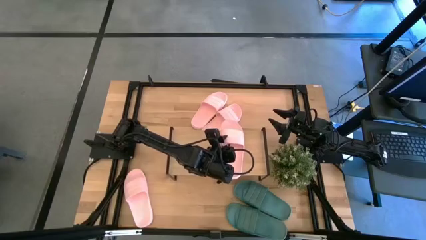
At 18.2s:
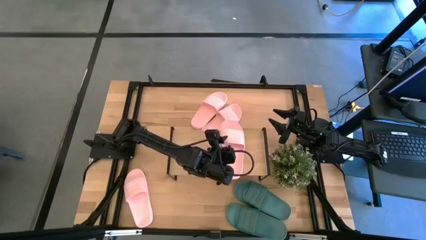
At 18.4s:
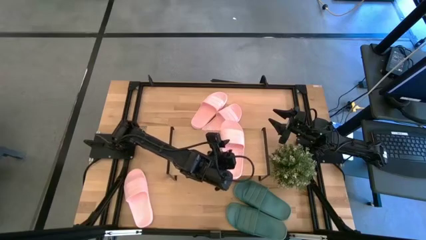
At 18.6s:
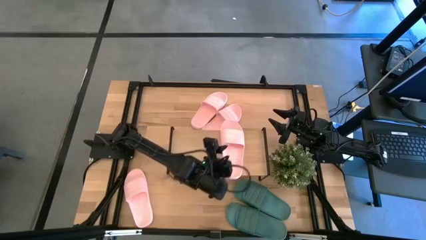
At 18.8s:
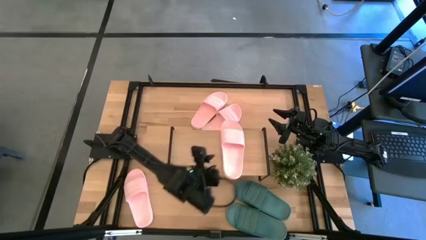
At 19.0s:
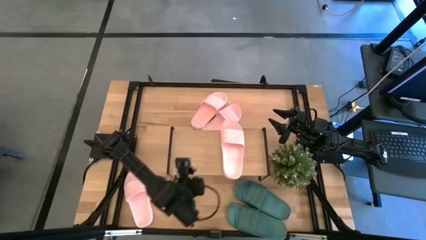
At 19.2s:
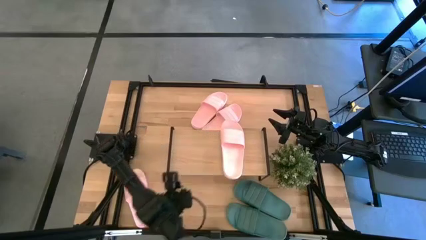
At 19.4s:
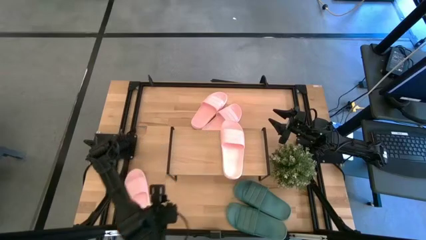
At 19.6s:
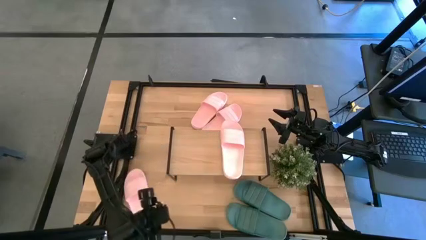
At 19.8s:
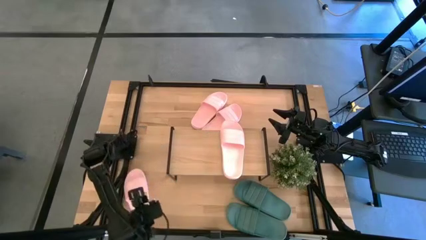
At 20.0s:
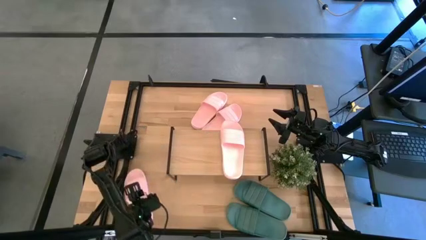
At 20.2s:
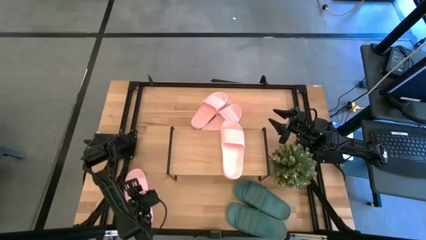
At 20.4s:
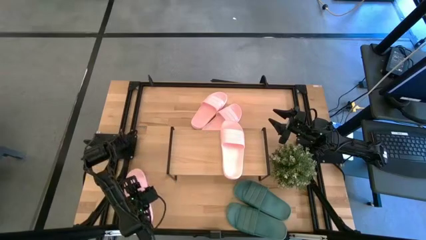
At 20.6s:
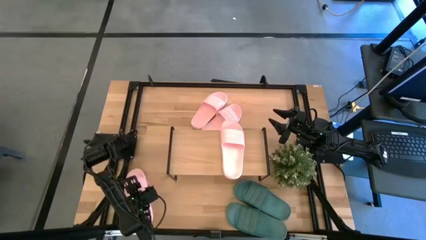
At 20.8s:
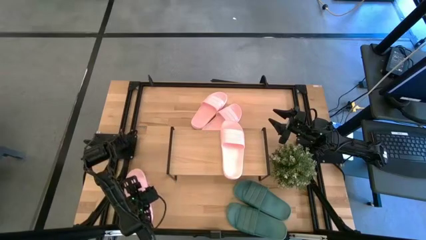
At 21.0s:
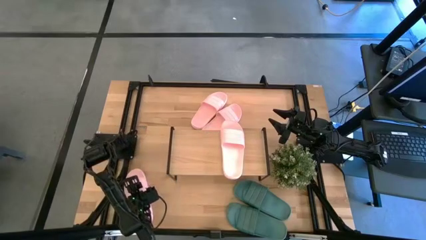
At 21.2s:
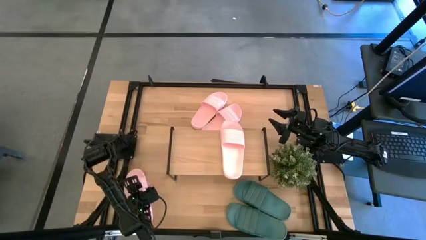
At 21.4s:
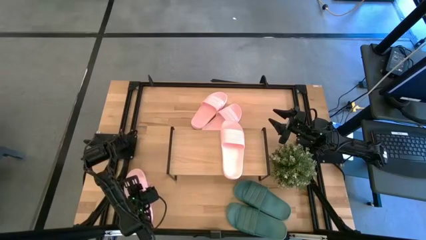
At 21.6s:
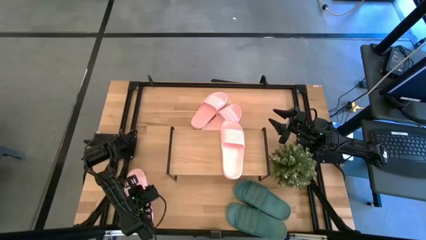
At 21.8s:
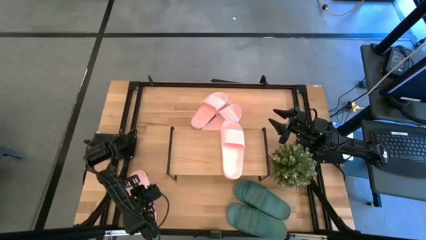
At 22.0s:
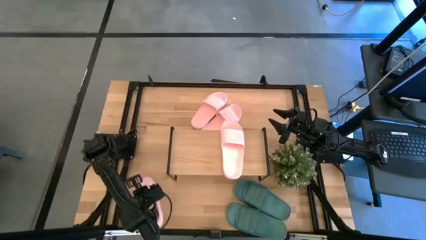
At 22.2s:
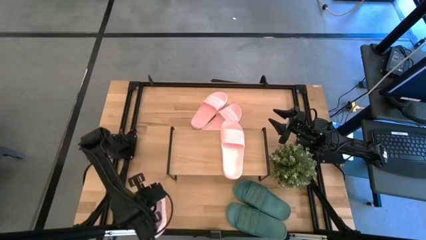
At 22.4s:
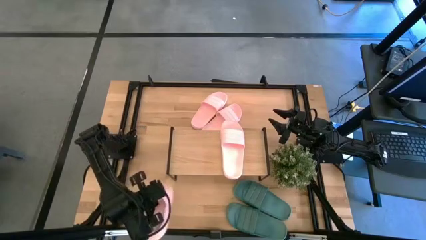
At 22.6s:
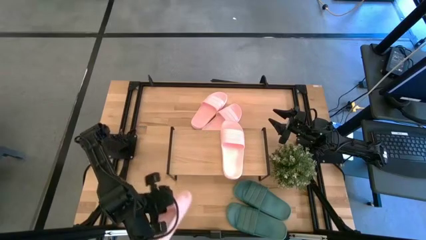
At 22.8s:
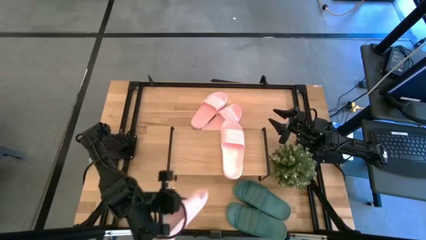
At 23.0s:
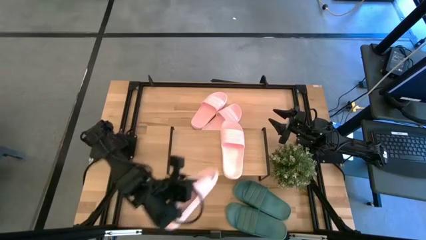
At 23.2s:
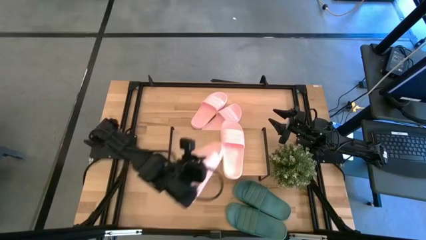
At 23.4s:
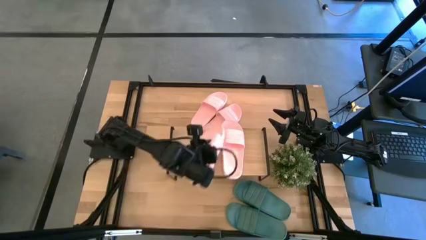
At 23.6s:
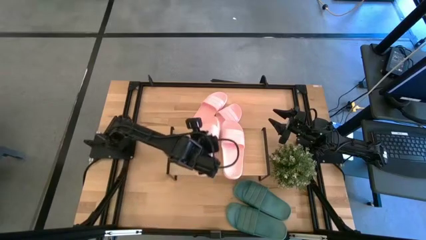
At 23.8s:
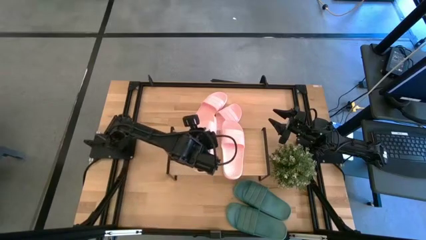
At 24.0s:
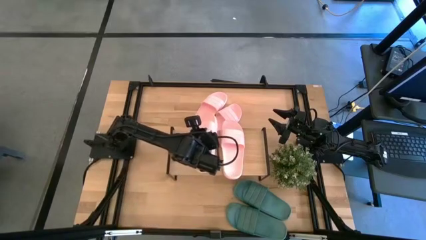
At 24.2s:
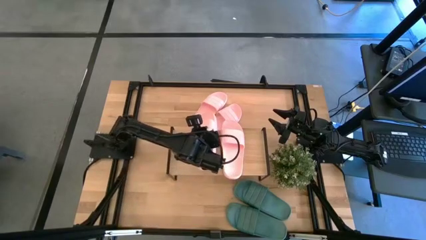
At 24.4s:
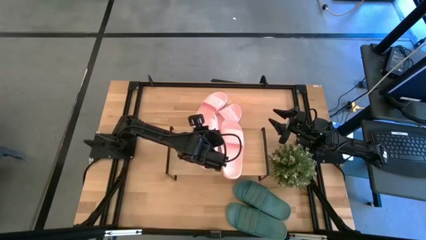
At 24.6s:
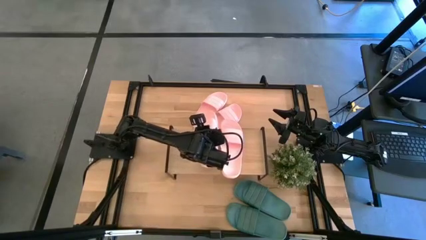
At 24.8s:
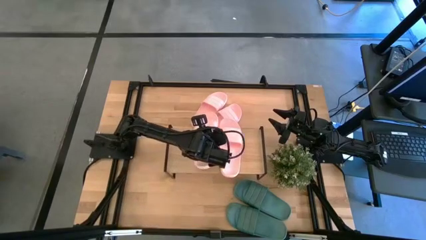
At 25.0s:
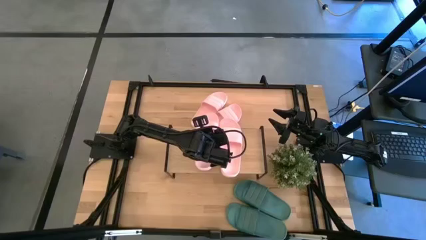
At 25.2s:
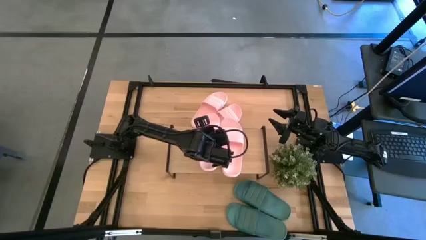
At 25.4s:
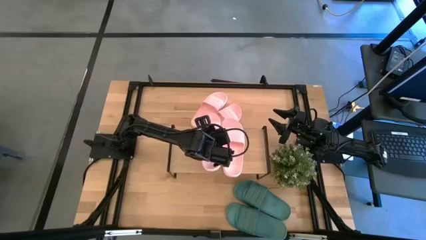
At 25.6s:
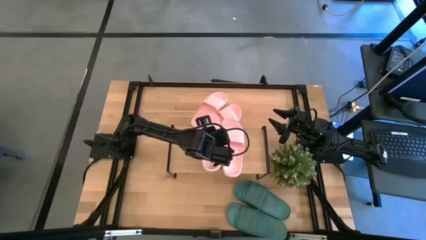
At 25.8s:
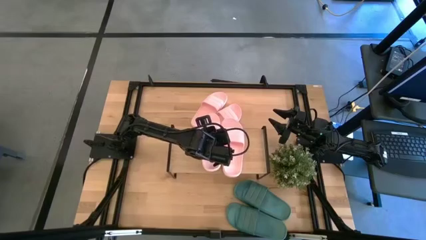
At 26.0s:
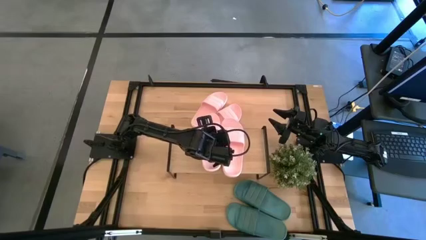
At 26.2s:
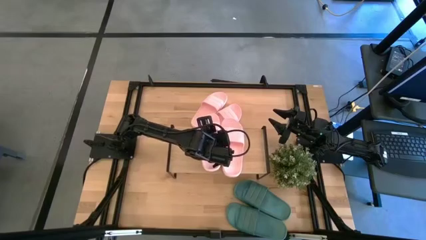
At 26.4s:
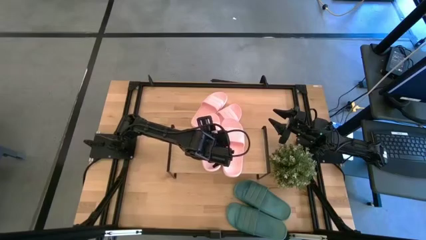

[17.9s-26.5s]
Task: Pick and place slides into the shelf
Put the pink slipper on the shelf

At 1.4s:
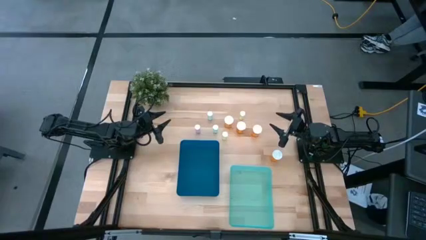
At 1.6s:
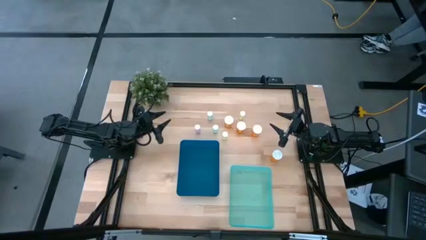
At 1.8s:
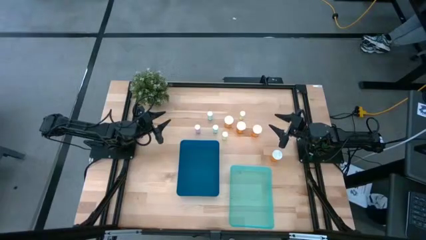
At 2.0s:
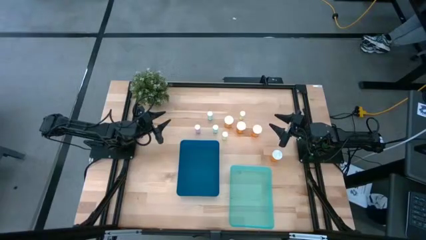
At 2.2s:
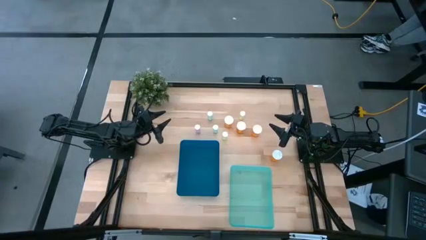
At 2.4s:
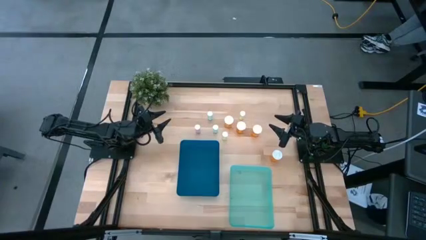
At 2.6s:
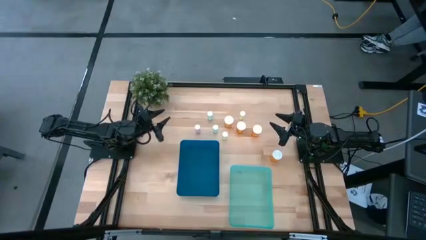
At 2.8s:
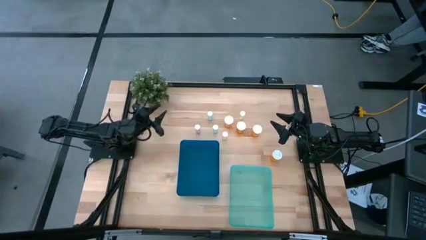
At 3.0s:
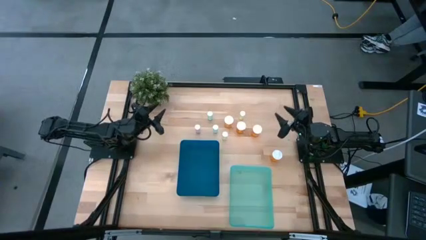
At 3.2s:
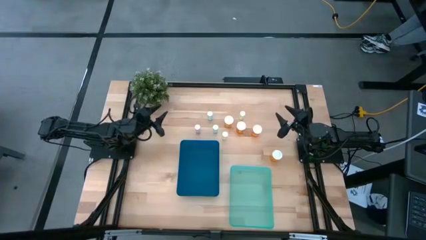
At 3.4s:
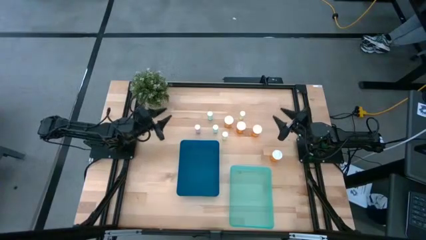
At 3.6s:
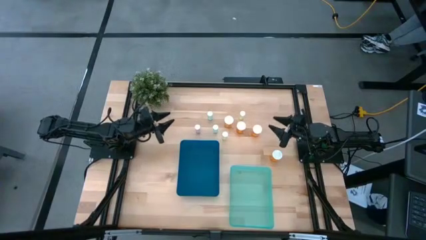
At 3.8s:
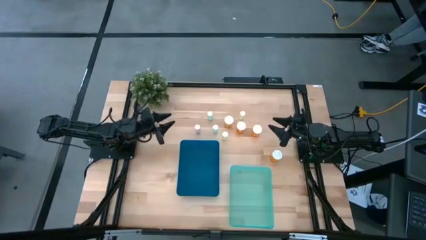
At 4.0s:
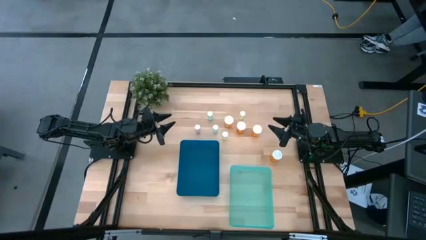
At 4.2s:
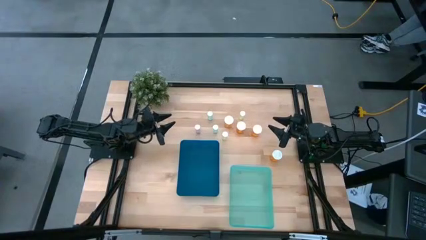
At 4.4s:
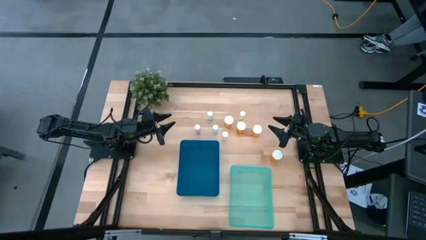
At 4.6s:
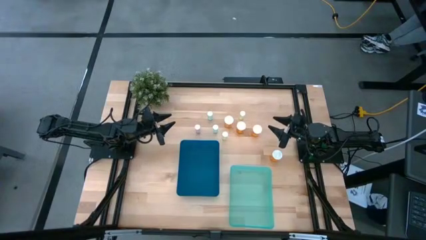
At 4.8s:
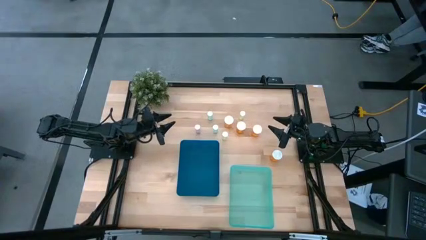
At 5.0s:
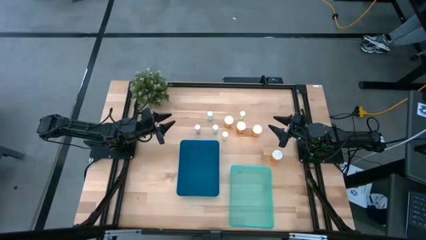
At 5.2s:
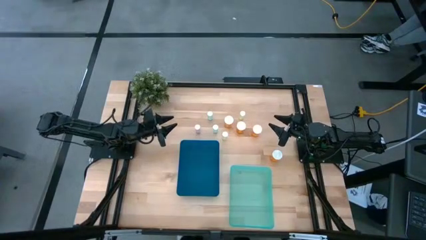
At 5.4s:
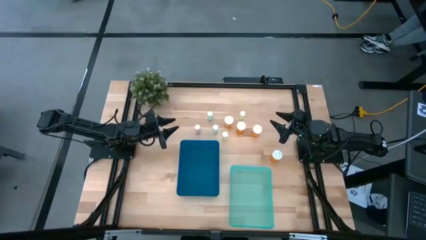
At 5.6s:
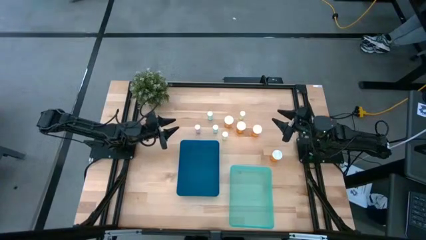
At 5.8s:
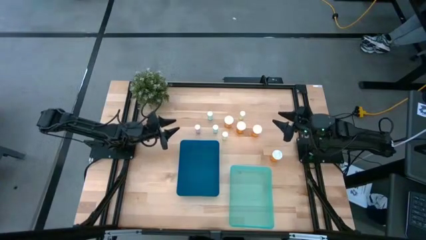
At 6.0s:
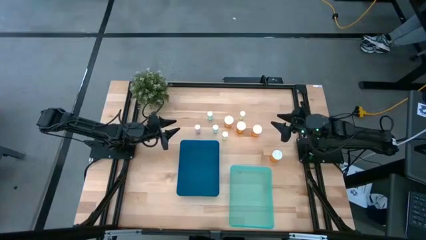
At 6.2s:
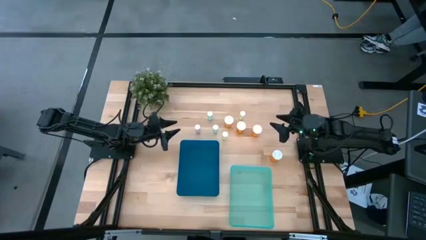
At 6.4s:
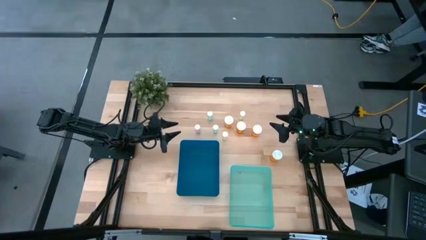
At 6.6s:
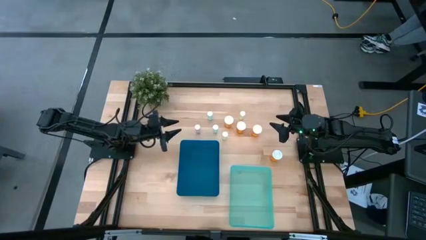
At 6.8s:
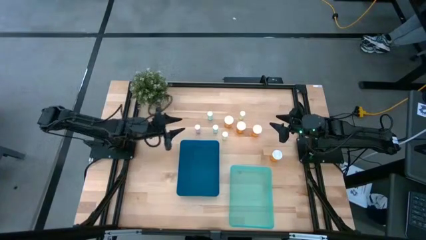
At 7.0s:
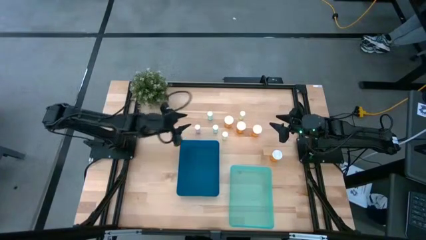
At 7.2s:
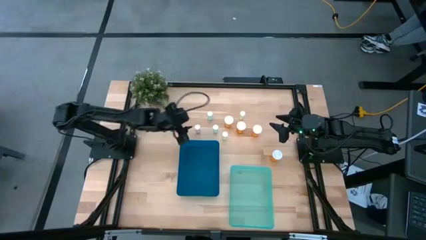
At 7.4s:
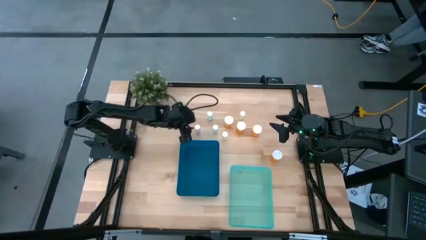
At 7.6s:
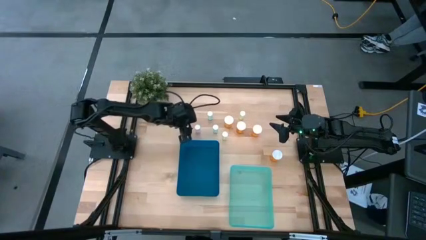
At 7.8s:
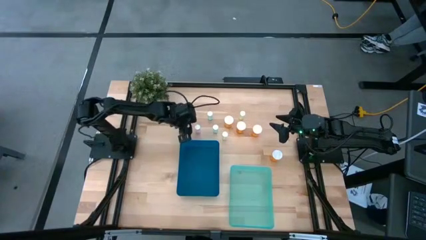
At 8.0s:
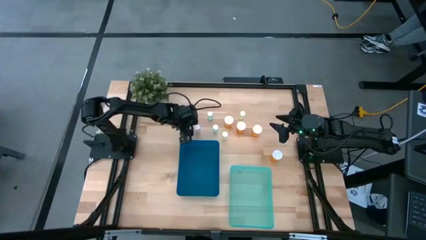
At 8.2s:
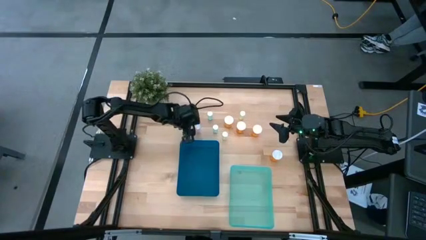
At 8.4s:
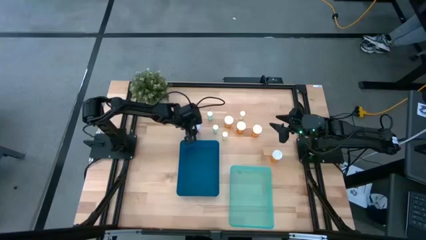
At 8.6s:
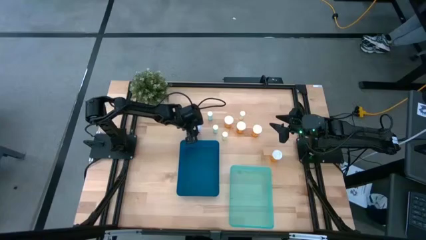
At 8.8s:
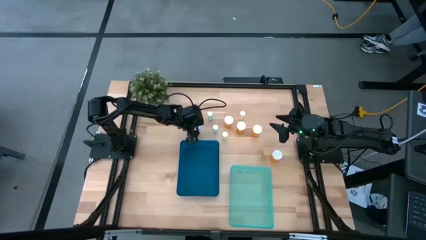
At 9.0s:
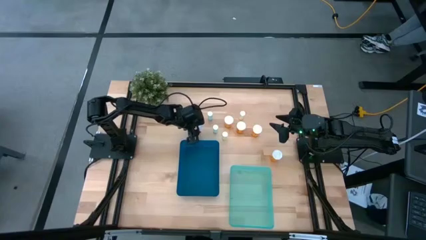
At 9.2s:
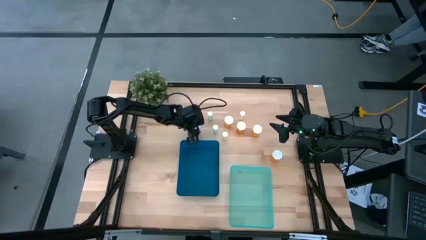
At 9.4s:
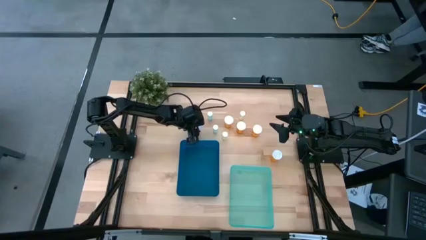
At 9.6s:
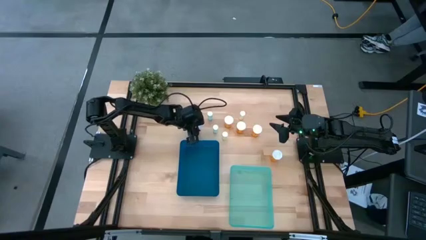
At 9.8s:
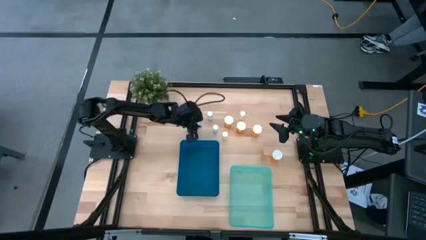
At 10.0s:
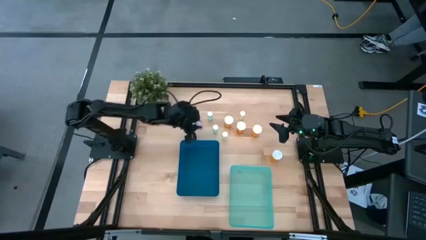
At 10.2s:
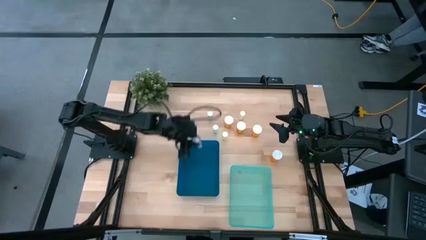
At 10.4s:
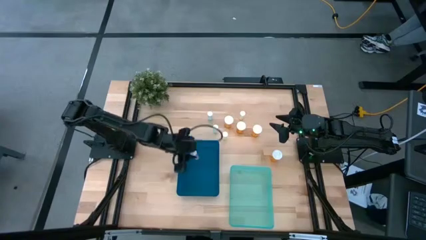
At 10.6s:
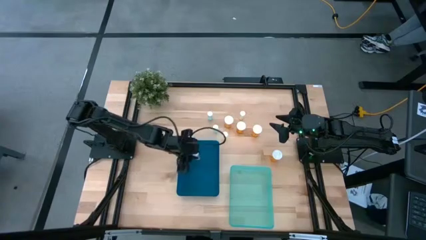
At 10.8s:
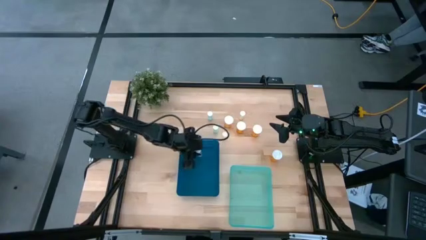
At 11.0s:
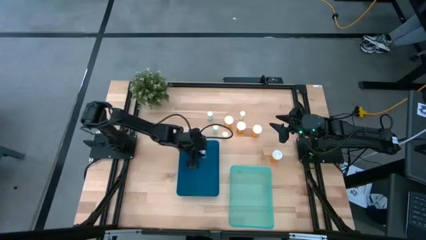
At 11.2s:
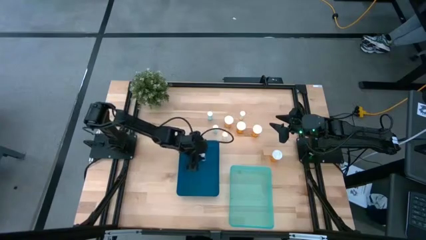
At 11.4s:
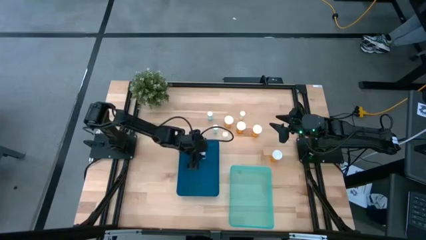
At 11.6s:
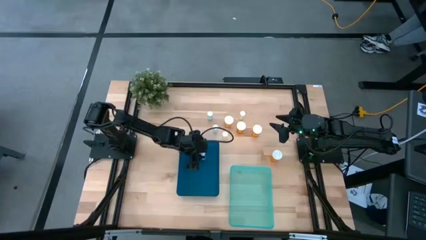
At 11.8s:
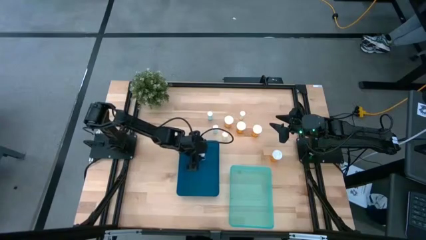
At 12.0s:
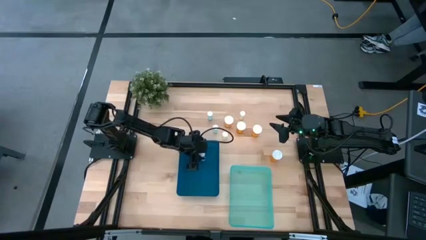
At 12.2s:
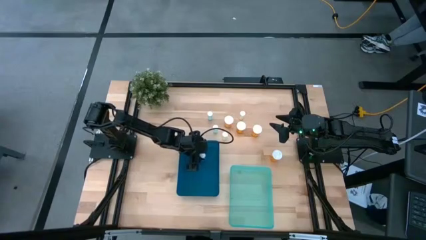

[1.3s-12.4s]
Task: Pick and place medicine bottles into bin by pill shape (circle, oval)
Put the pink pill bottle into the blue bin
